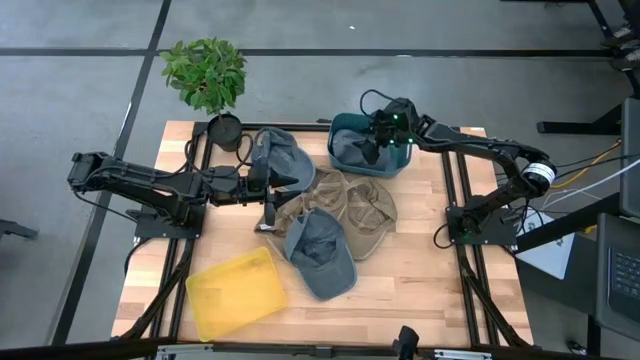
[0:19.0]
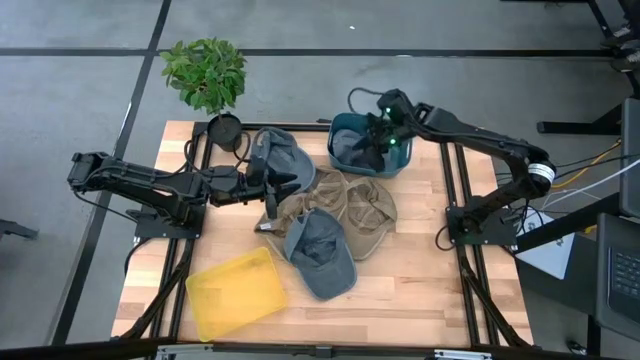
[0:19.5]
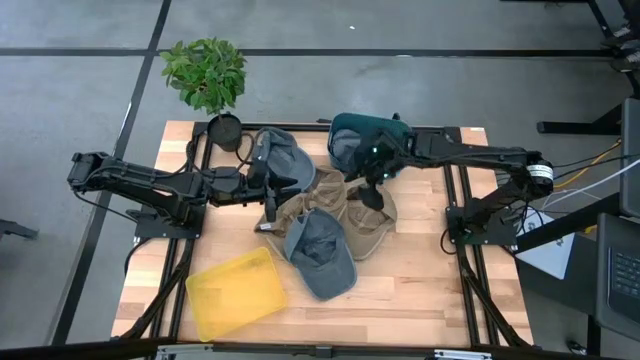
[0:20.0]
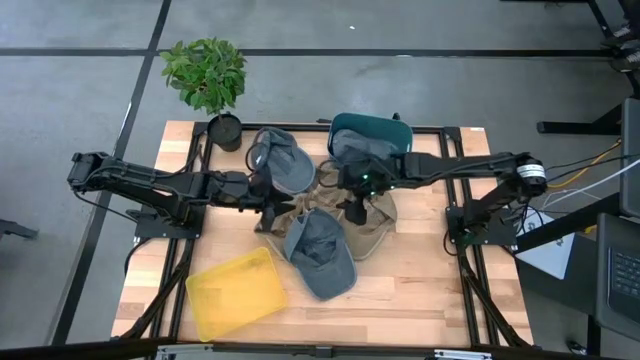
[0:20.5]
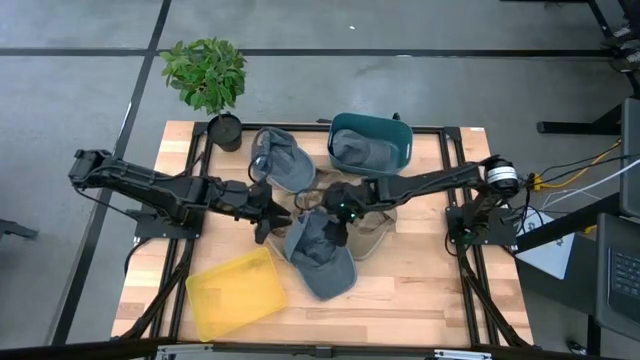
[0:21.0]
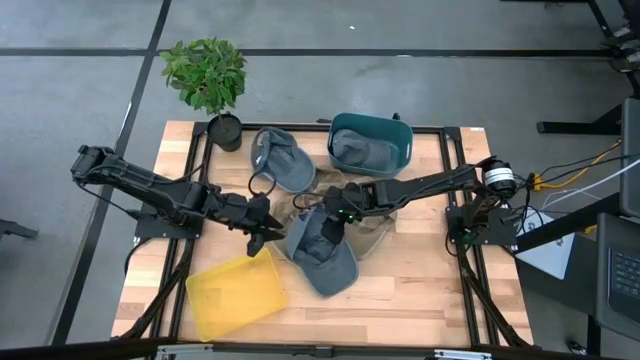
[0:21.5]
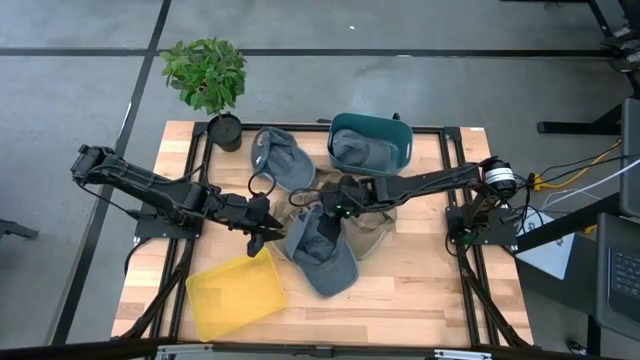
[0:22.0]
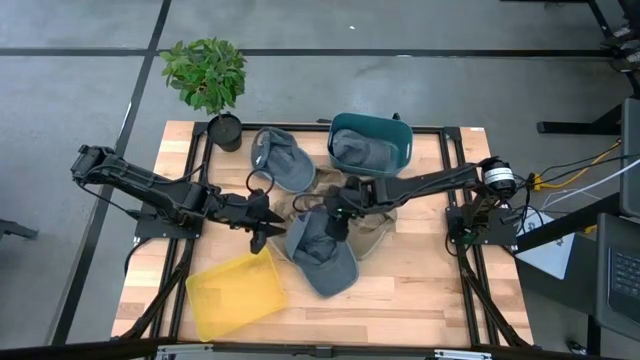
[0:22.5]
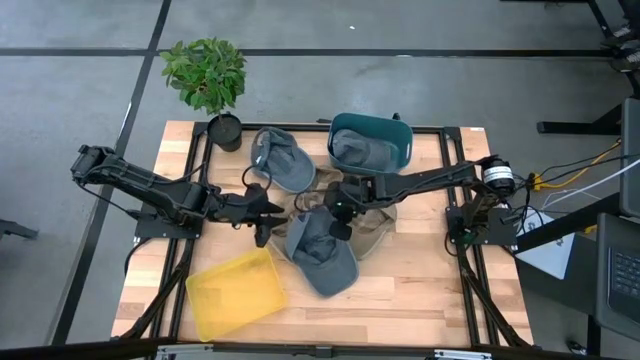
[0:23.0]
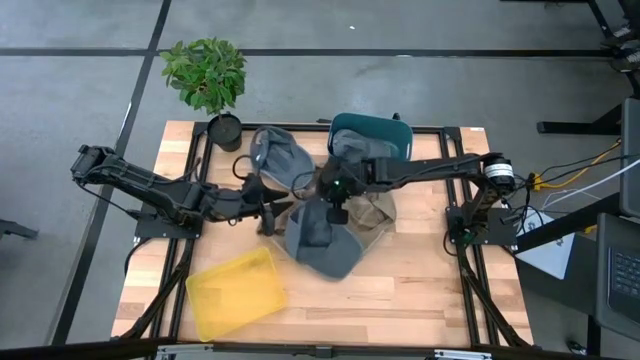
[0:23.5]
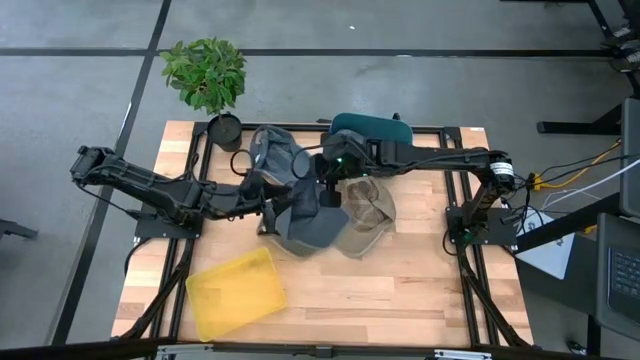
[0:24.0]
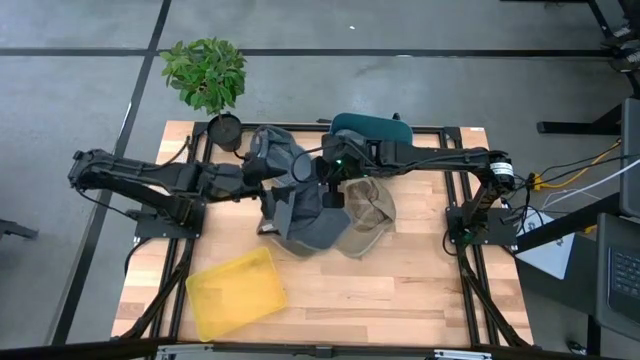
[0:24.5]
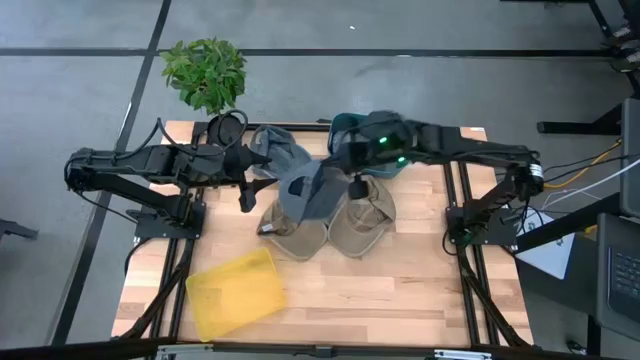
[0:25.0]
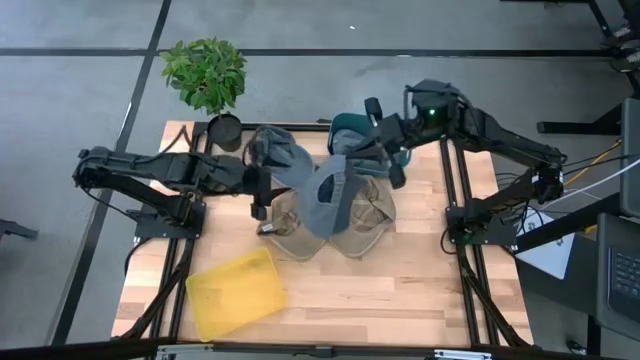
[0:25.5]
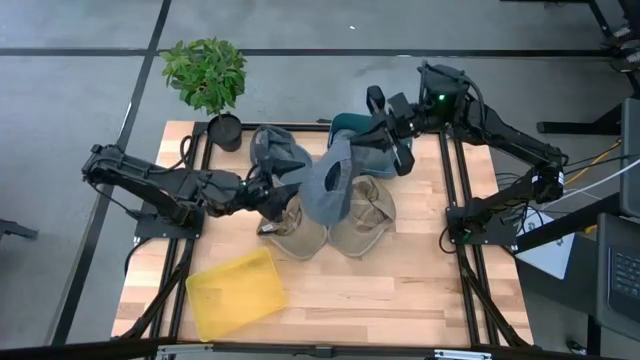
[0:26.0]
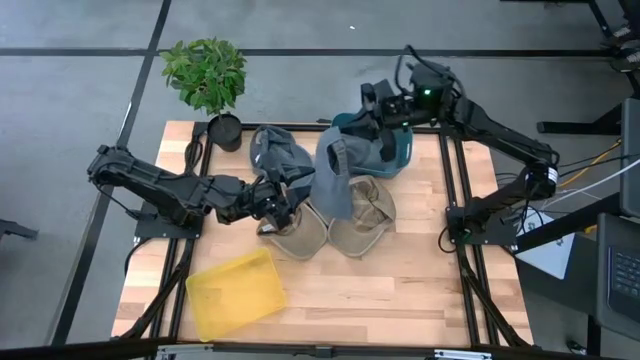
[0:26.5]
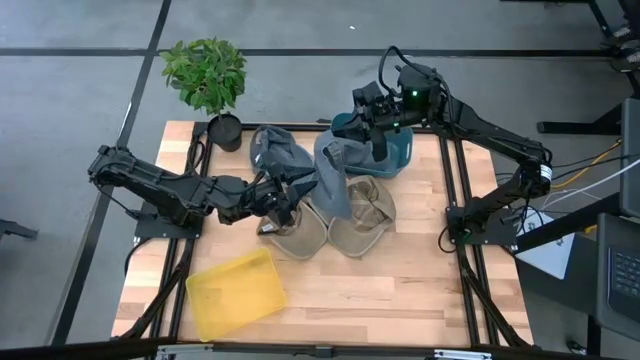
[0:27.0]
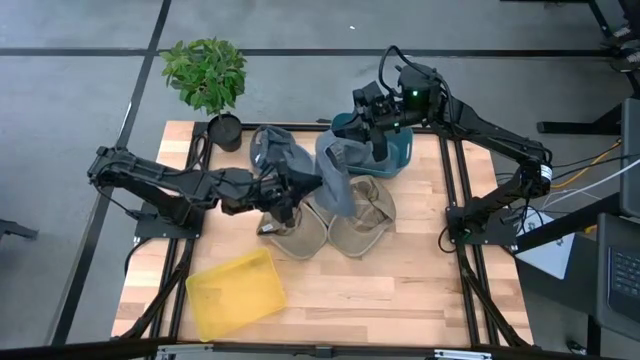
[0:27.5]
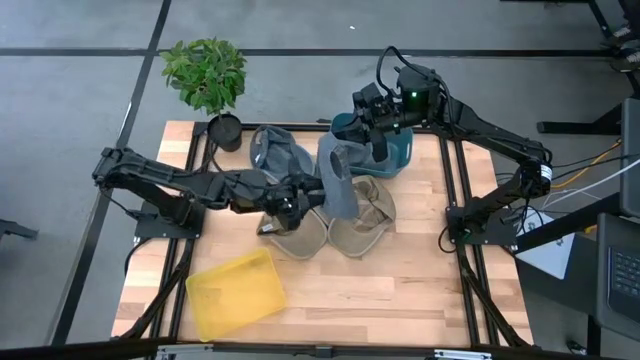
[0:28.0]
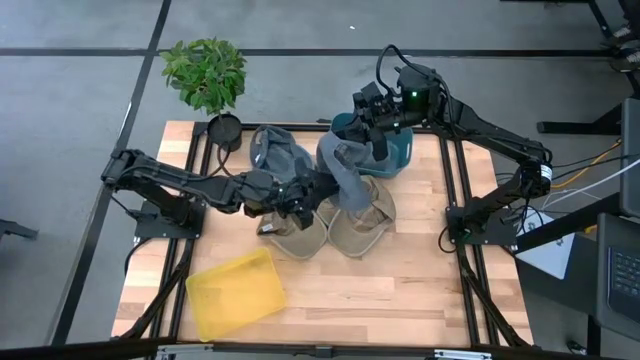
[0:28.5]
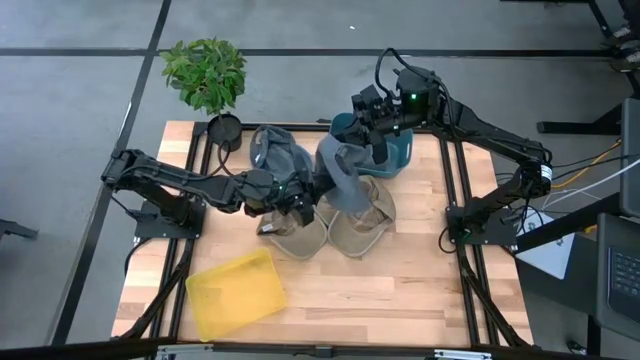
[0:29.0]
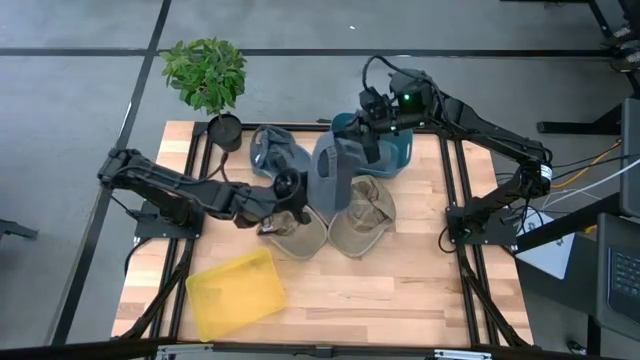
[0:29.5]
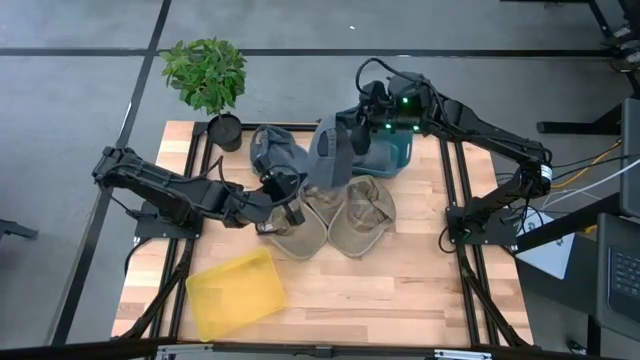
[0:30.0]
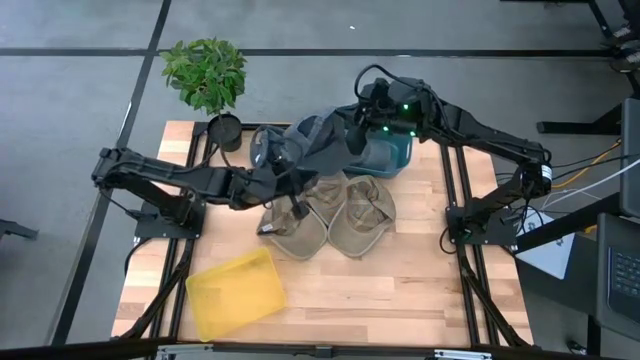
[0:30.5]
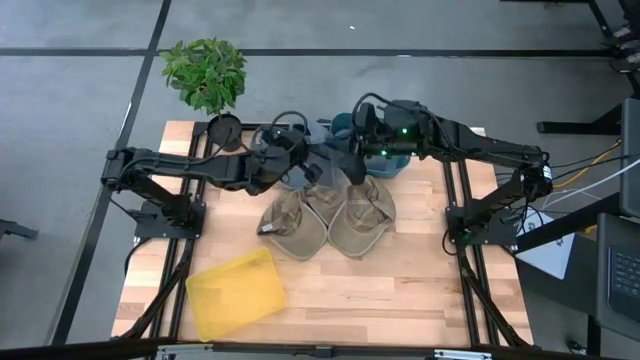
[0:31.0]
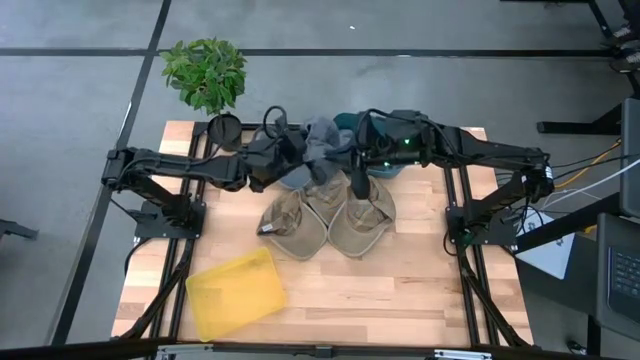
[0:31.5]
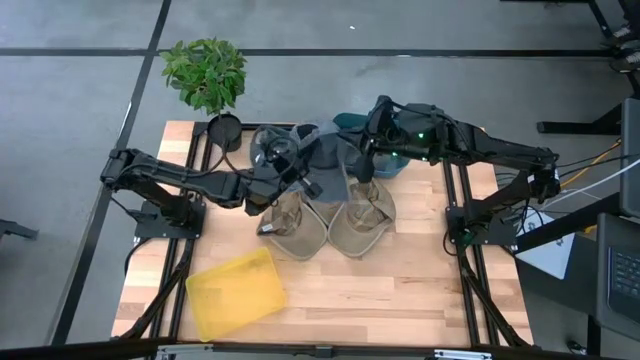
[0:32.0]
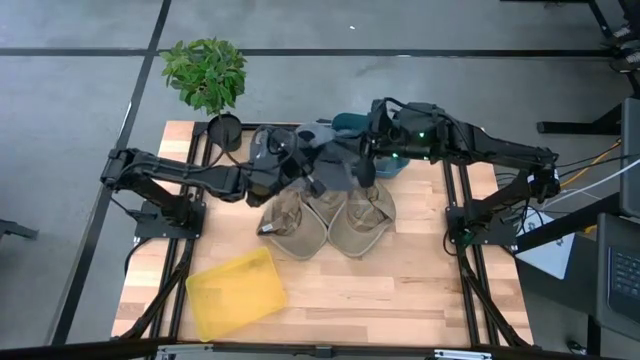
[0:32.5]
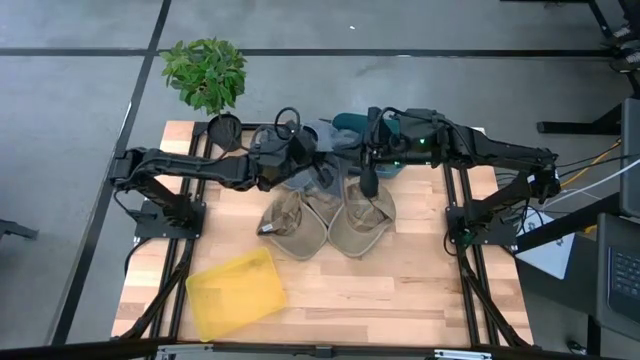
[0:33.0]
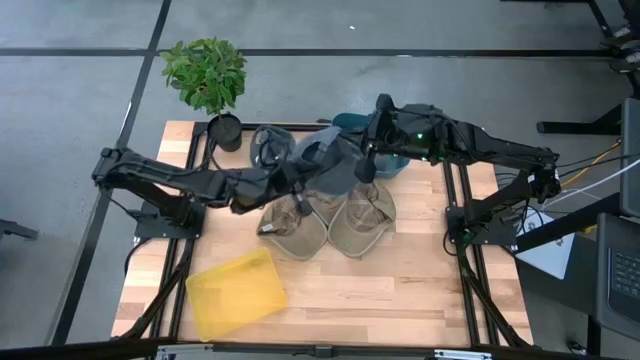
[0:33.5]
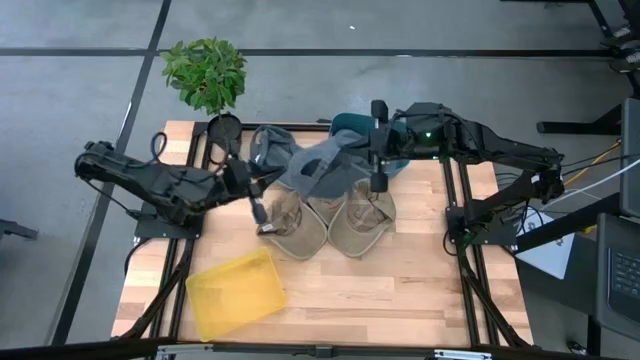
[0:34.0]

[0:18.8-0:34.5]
Task: Pick & Place hat
Put the bottom gray cap into the blue bin

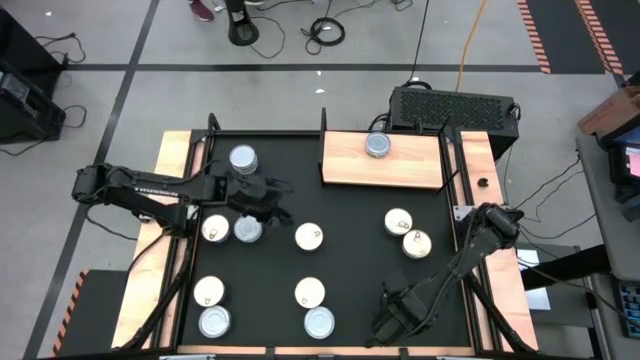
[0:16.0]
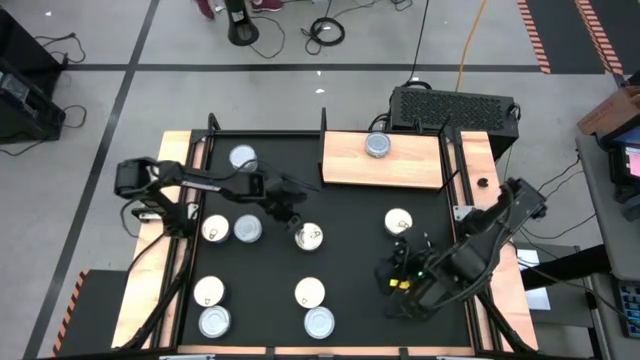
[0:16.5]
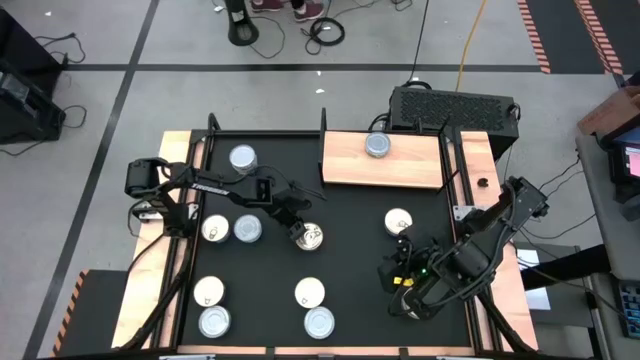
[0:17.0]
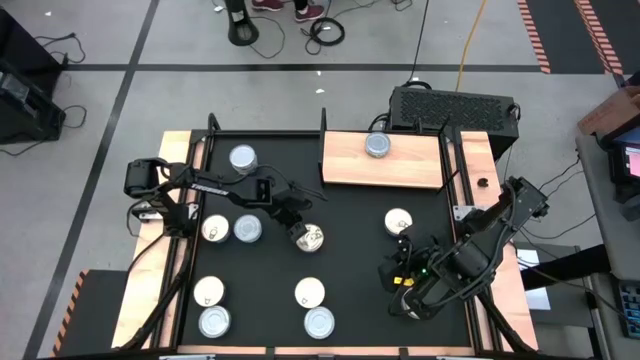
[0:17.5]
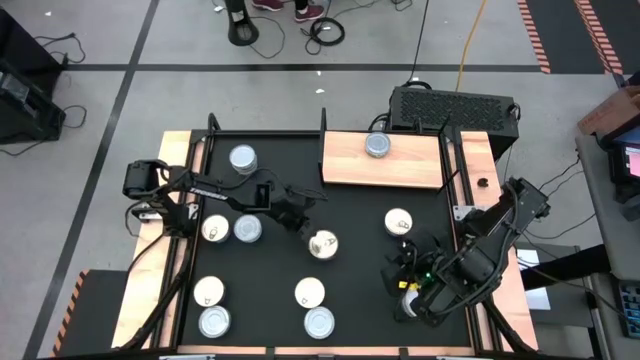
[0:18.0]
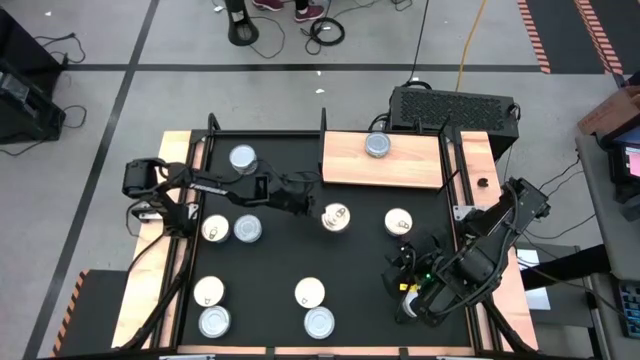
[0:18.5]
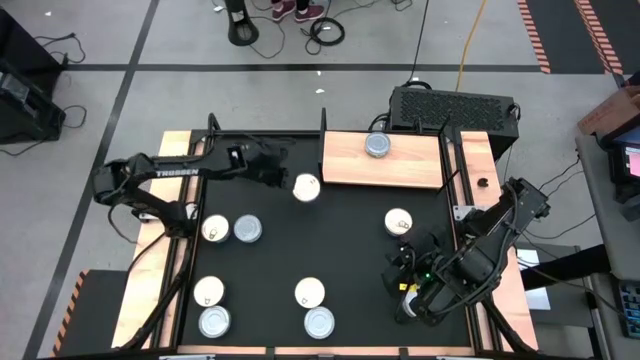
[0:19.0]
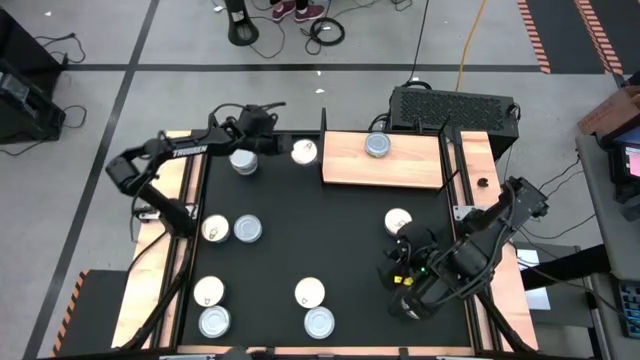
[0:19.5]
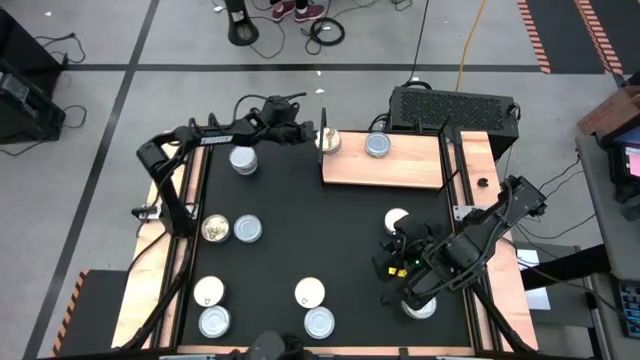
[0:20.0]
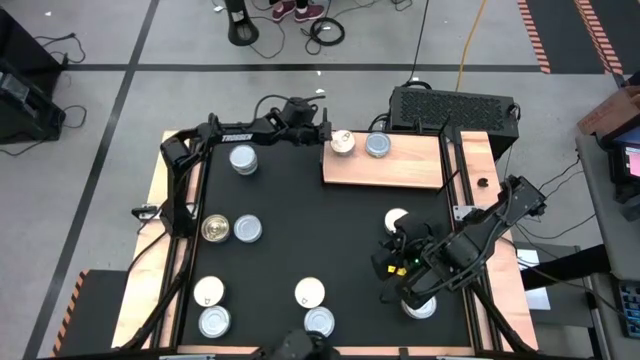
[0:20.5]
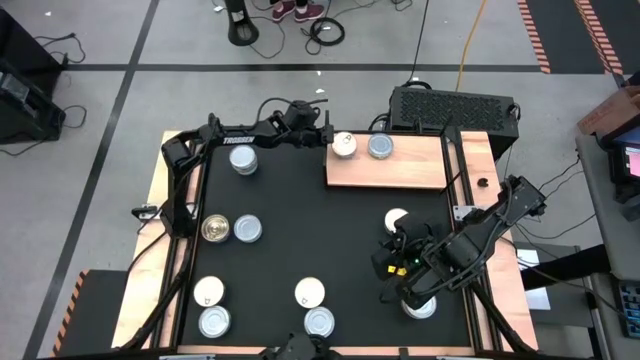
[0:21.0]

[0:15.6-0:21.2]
Task: Stack canned seafood by type on shelf
Put the blue pink tuna can on the shelf
